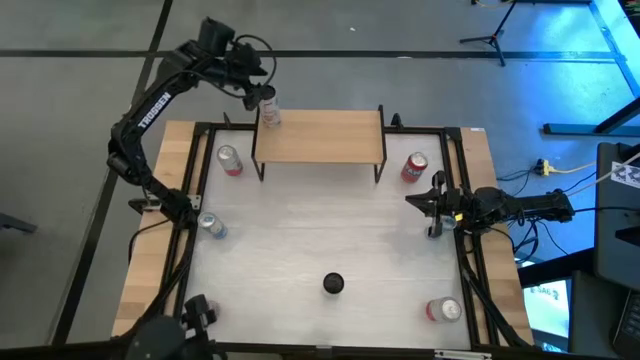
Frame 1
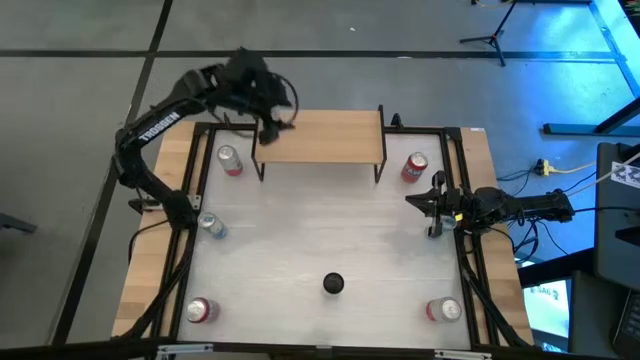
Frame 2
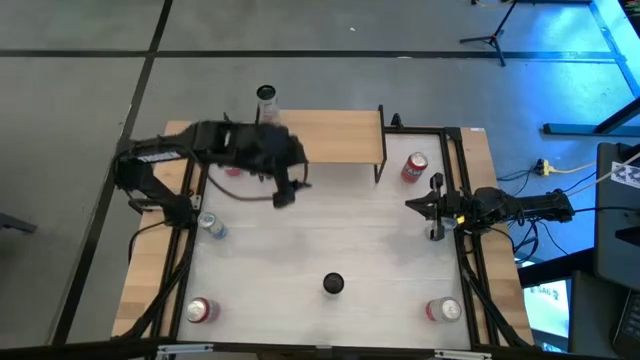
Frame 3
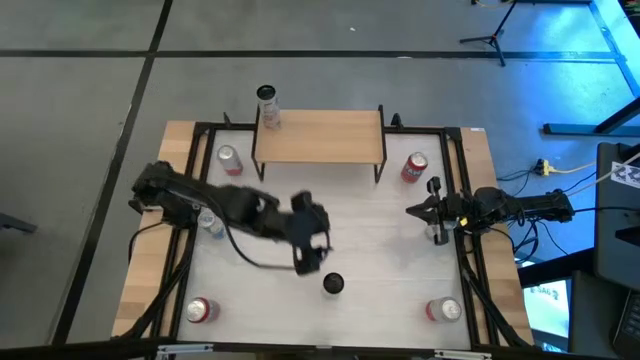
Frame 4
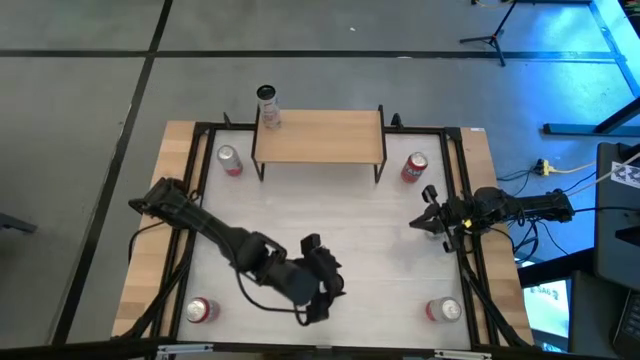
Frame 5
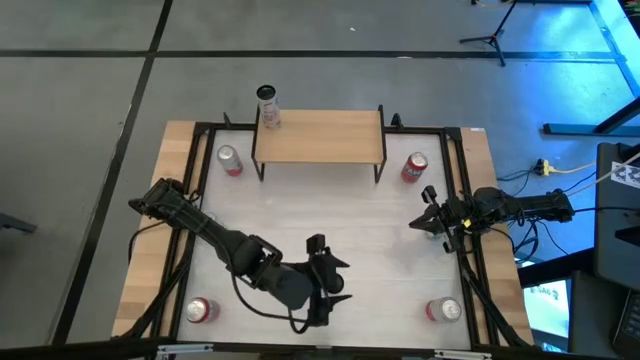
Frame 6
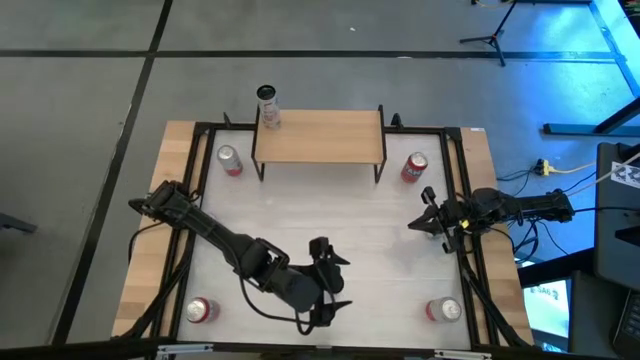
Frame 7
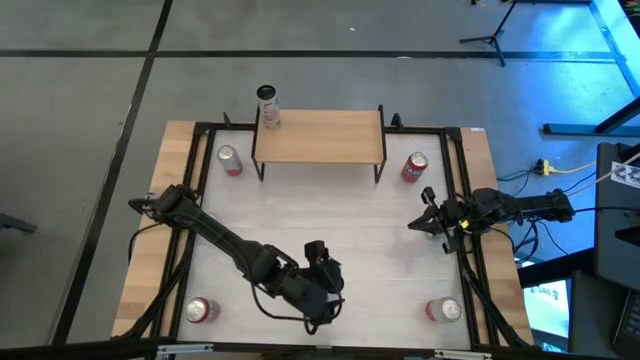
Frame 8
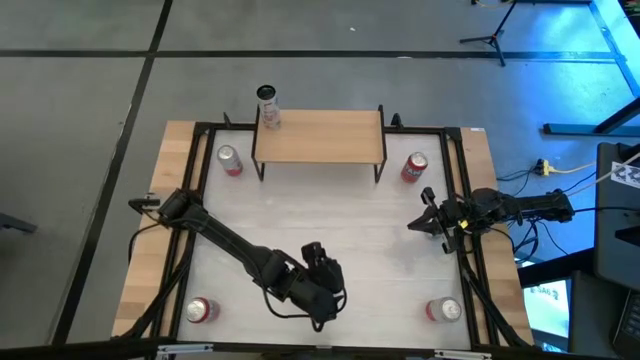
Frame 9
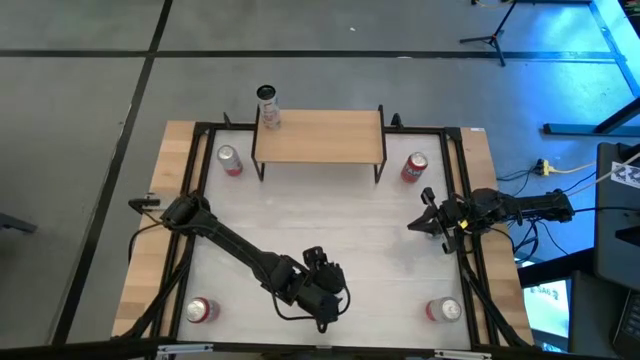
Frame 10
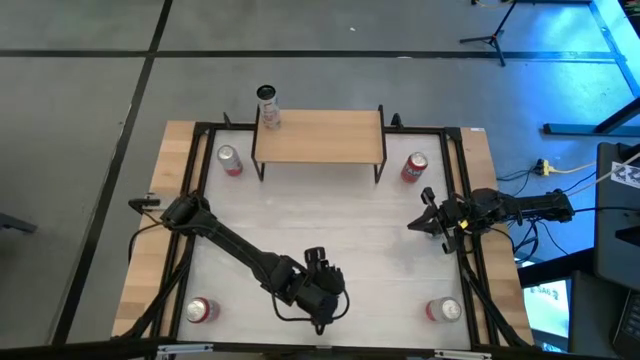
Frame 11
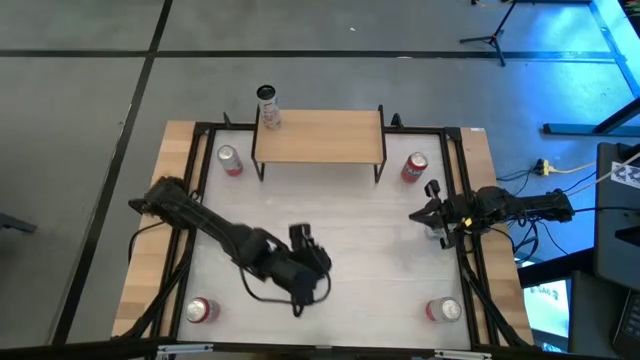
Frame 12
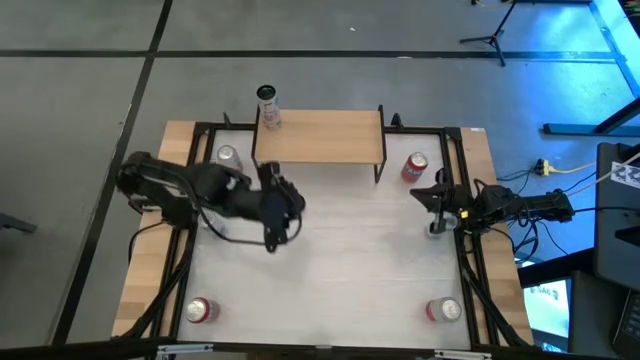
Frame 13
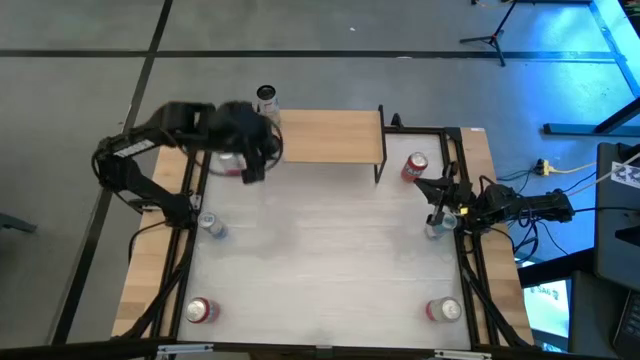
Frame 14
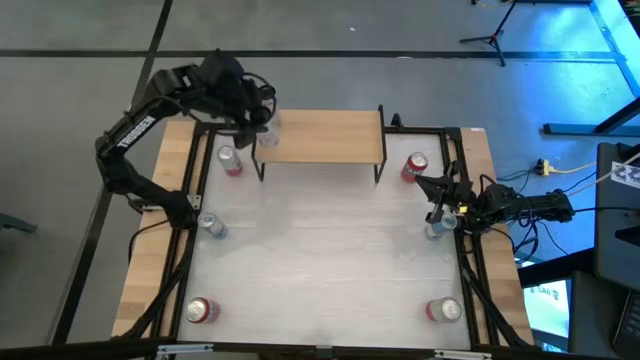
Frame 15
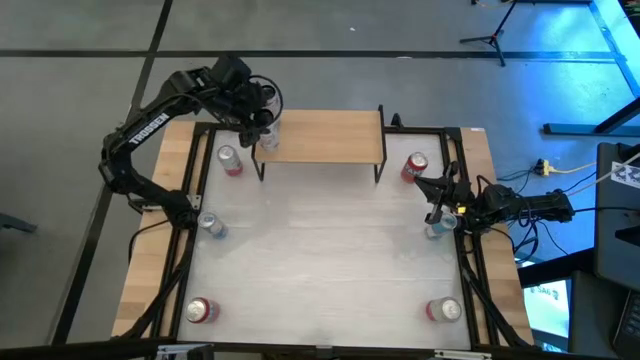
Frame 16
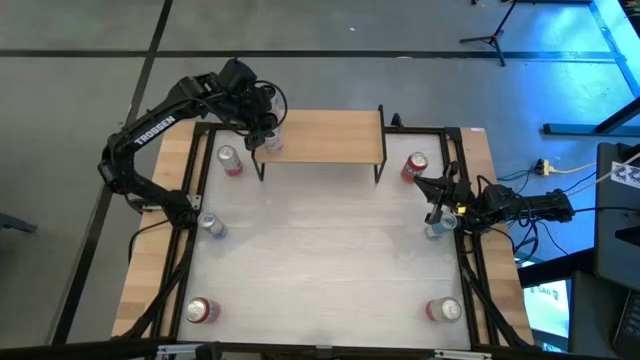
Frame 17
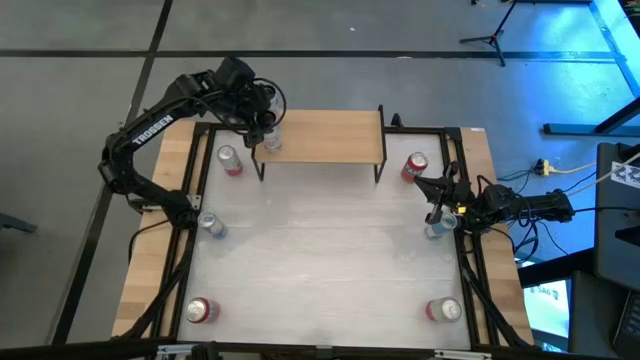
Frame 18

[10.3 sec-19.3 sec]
Task: Place canned beverage on shelf
Put the peach soda can on the shelf

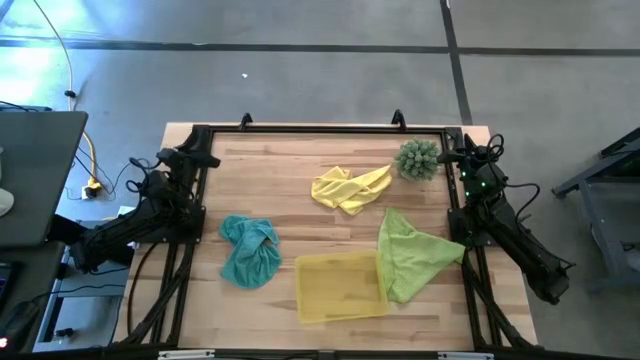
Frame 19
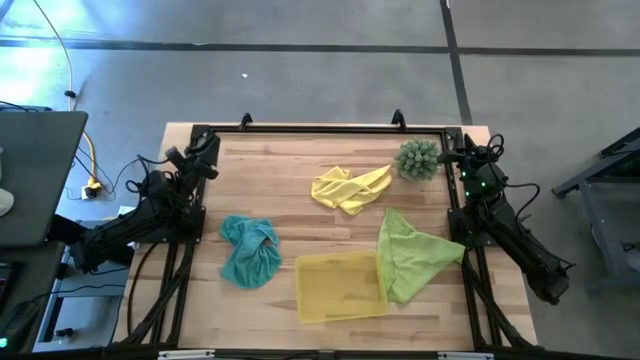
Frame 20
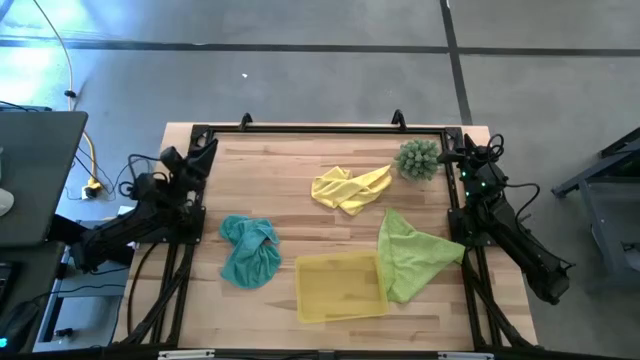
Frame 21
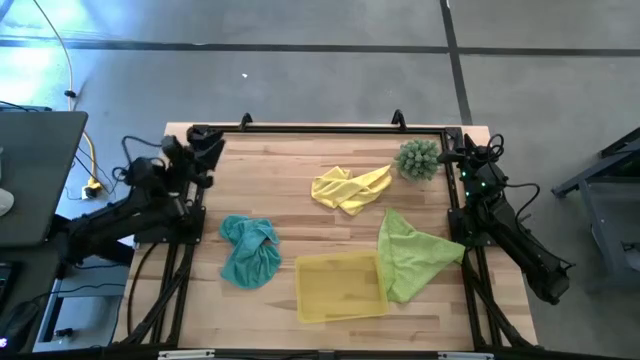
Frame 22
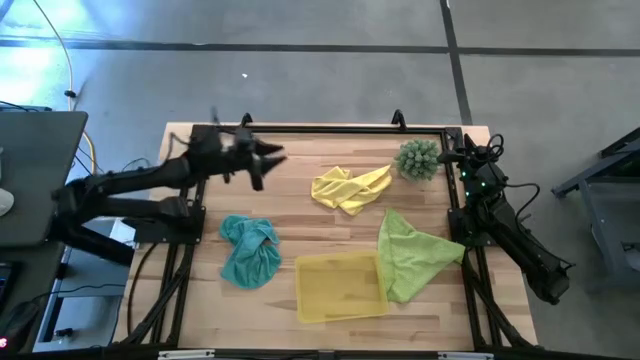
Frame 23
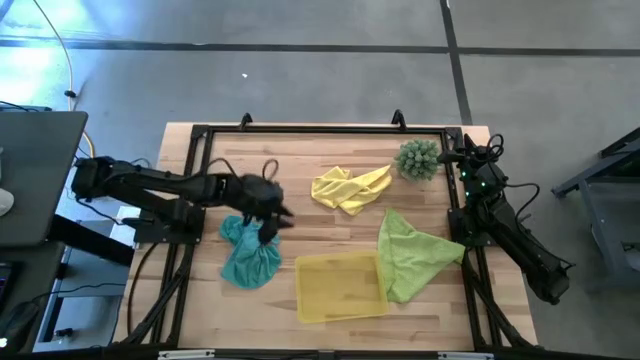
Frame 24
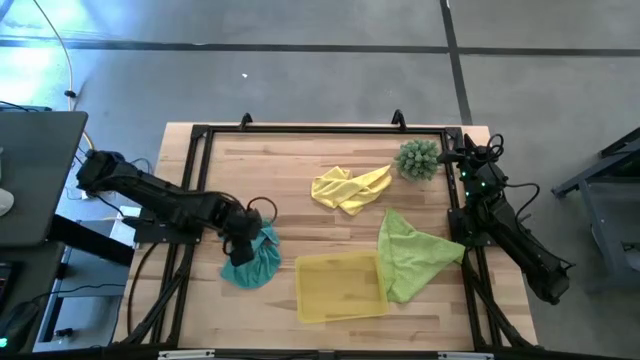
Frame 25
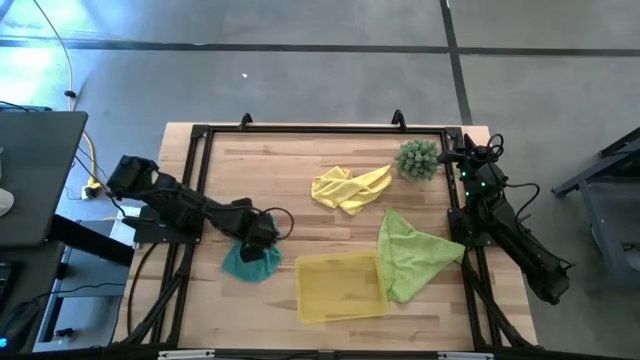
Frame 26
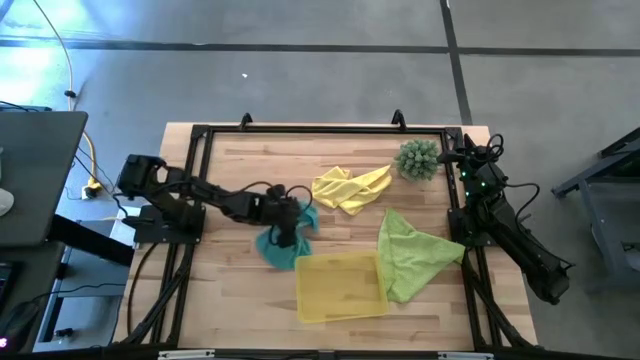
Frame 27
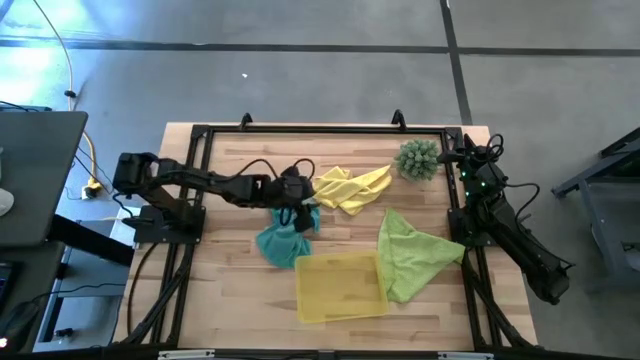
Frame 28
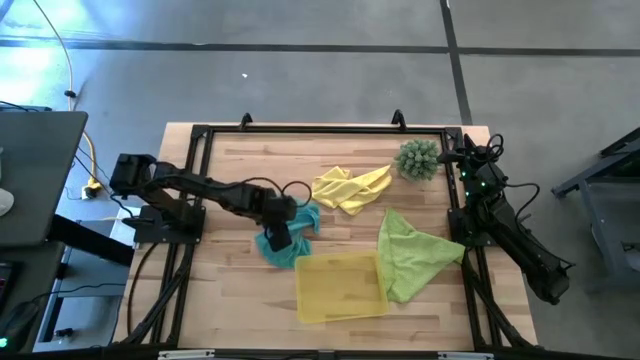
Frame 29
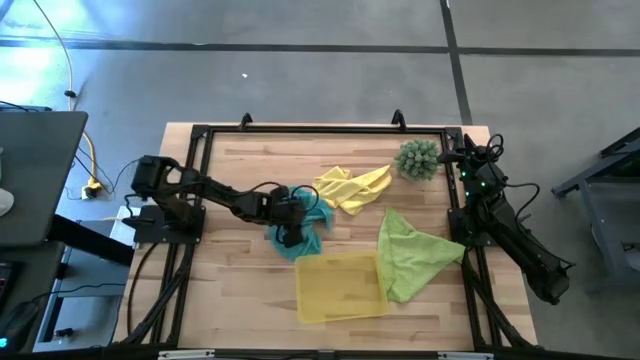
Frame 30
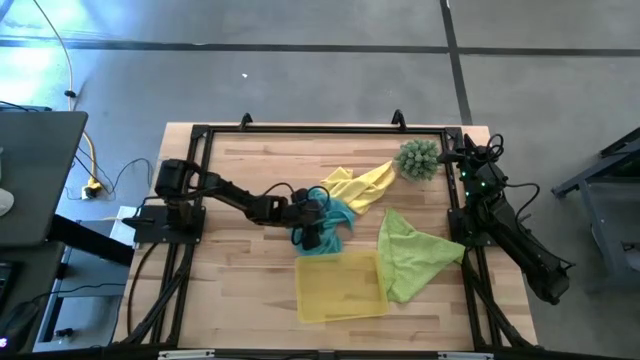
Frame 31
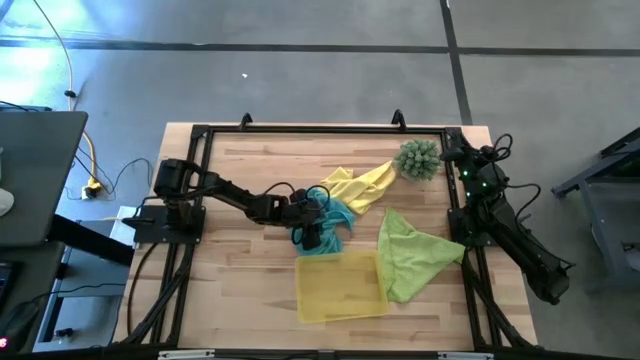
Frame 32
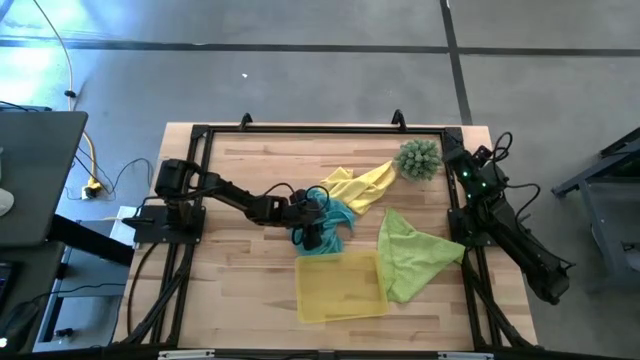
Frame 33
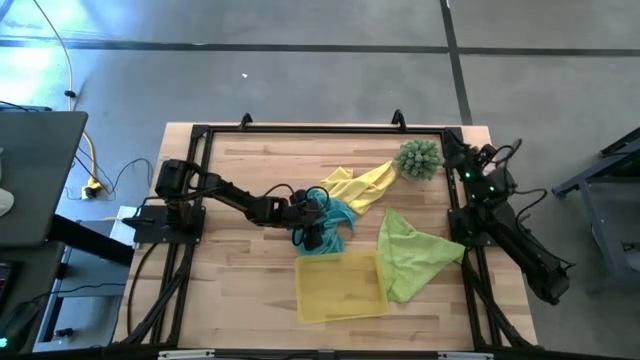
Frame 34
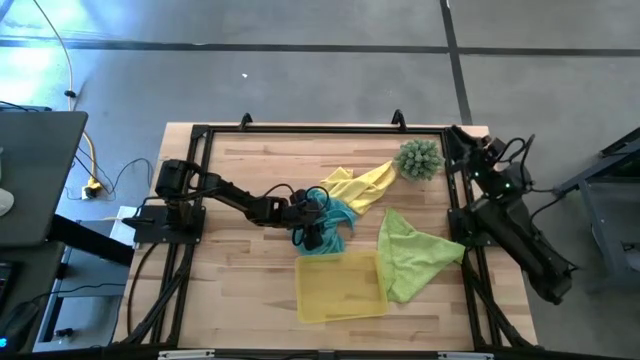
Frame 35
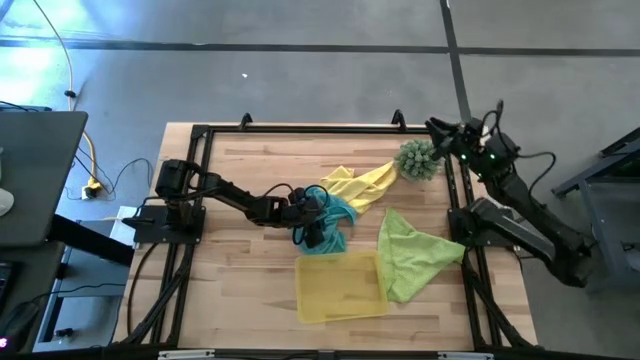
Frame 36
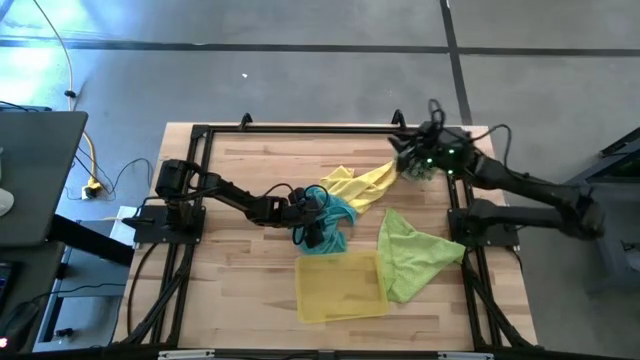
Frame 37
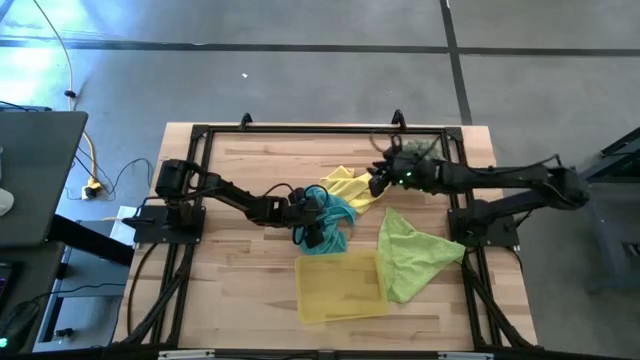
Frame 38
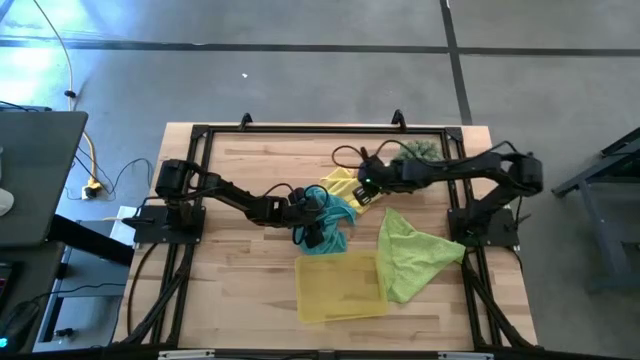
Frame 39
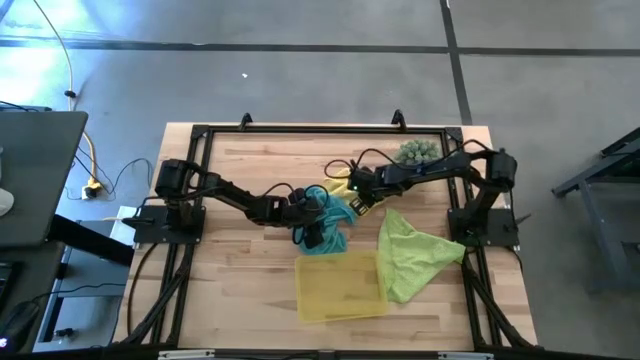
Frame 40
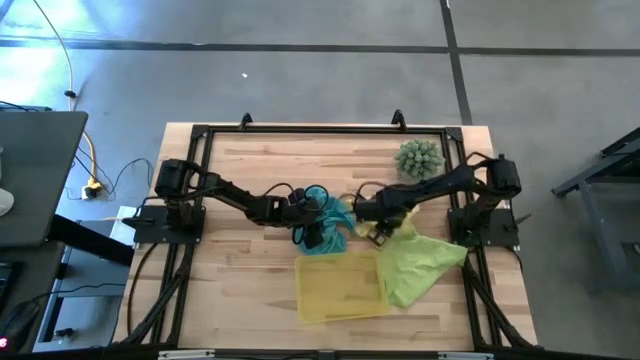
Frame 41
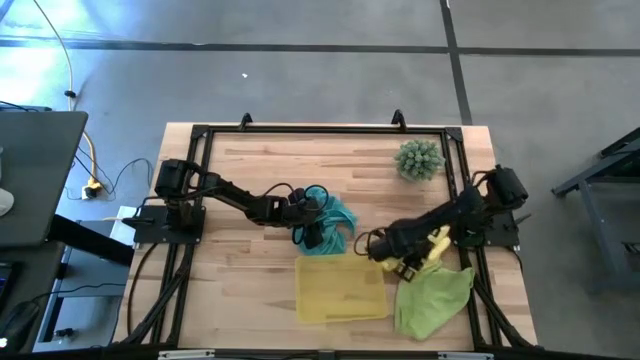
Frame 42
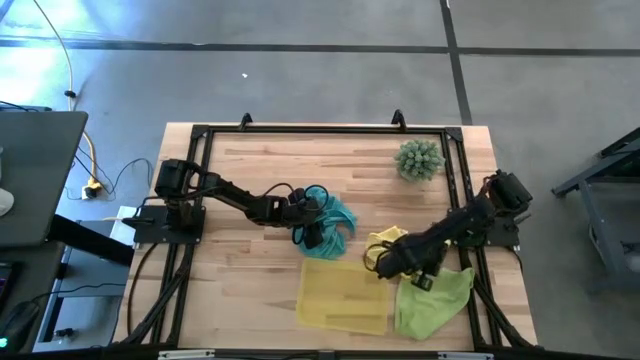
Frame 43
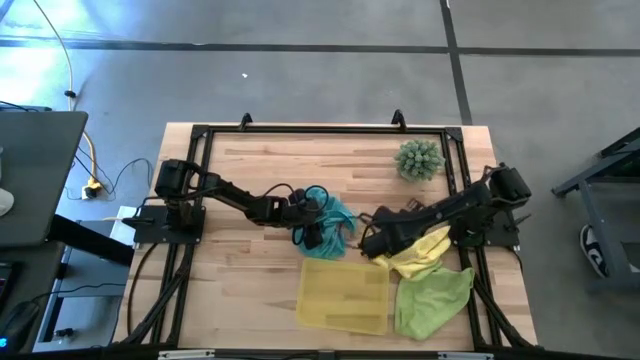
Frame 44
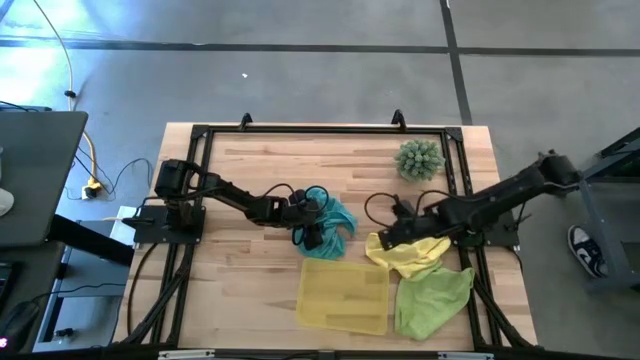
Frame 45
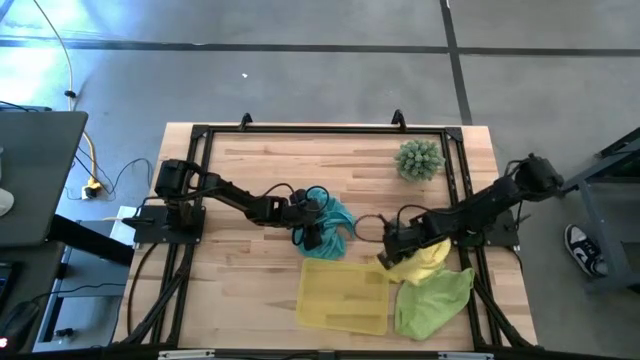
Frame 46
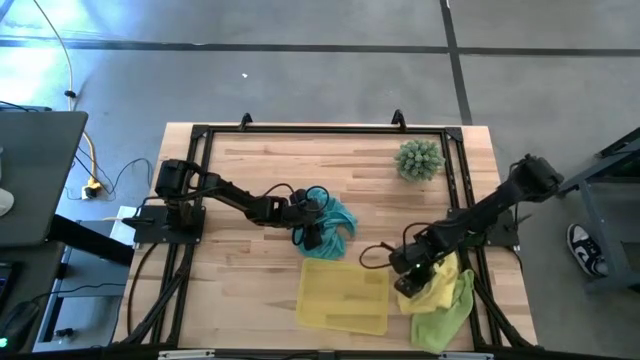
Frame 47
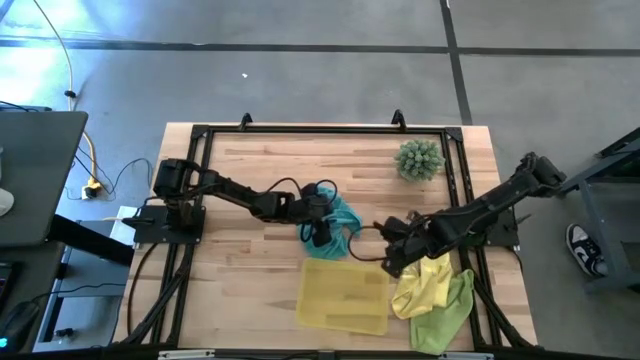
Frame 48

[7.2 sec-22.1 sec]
Task: Roll microfiber towels into tight, uniform cylinder then place into a basket
Fold the blue towel
